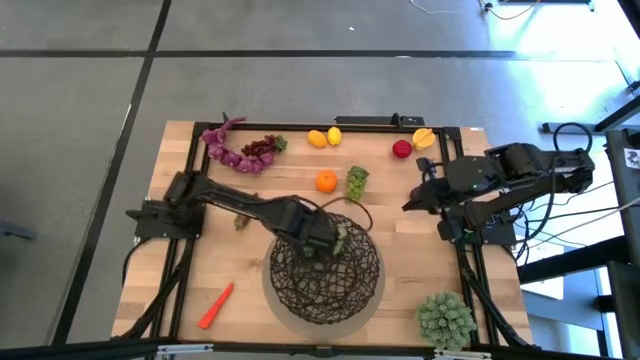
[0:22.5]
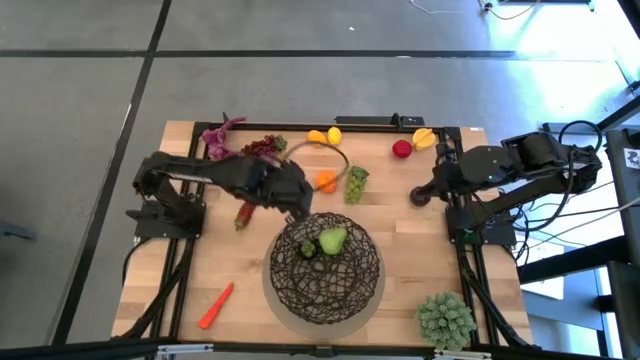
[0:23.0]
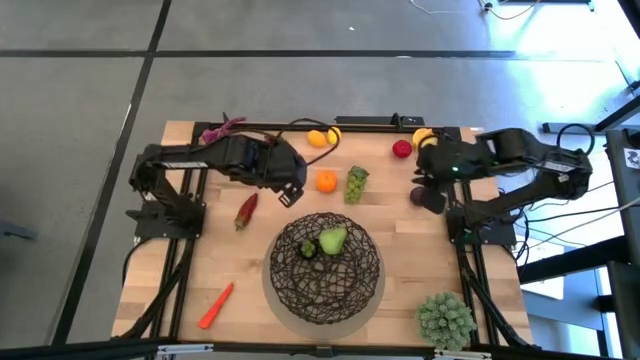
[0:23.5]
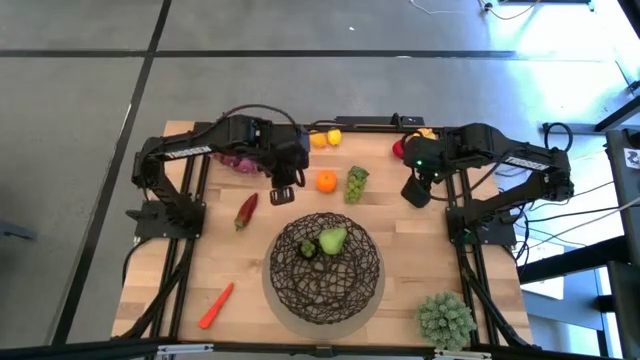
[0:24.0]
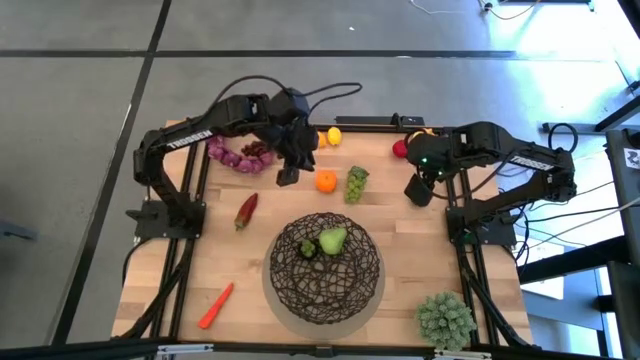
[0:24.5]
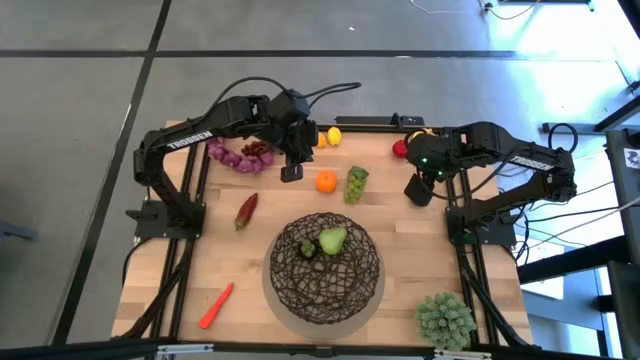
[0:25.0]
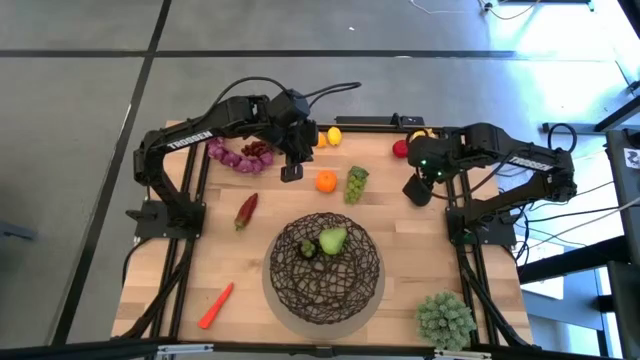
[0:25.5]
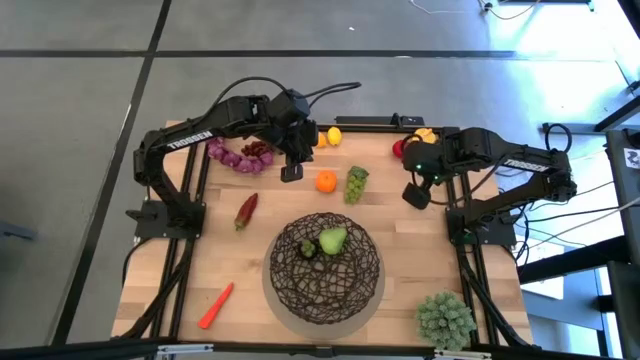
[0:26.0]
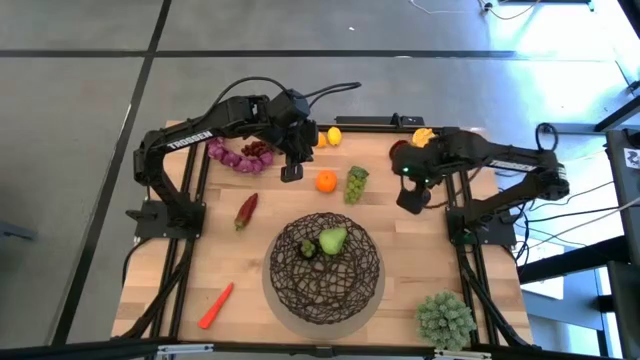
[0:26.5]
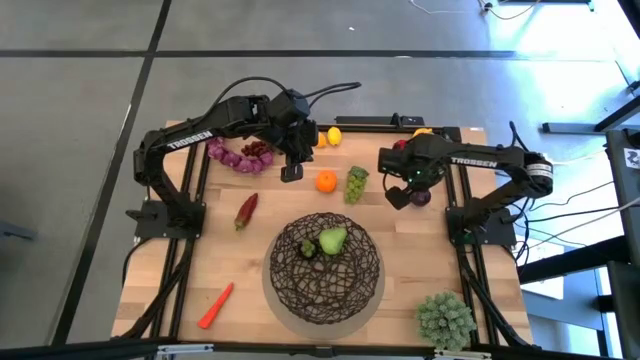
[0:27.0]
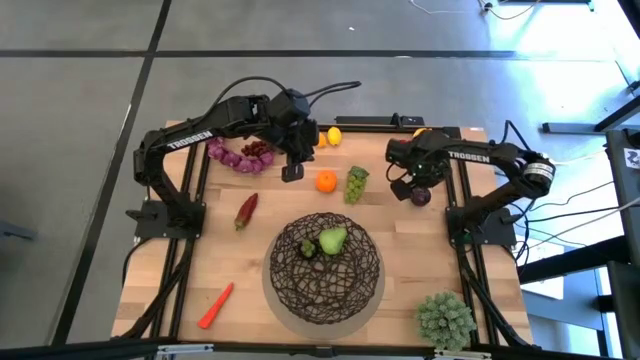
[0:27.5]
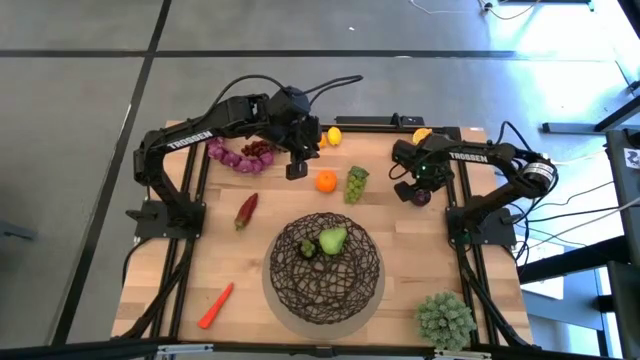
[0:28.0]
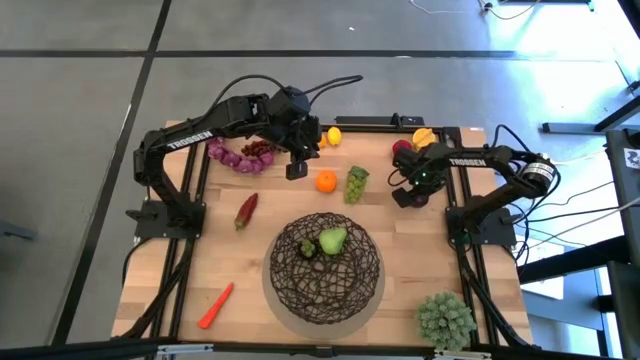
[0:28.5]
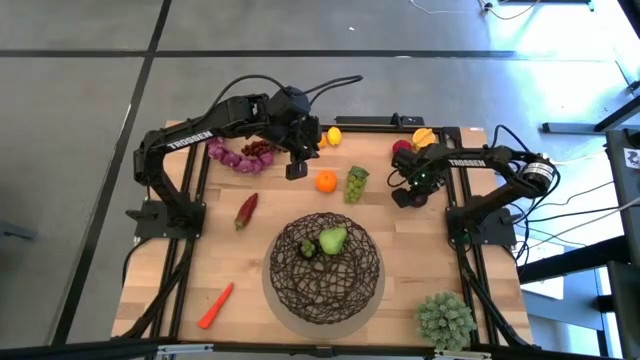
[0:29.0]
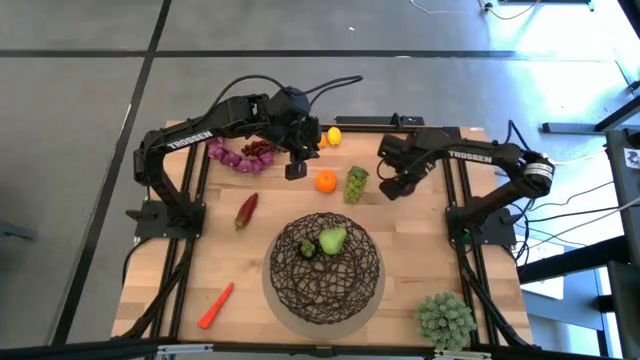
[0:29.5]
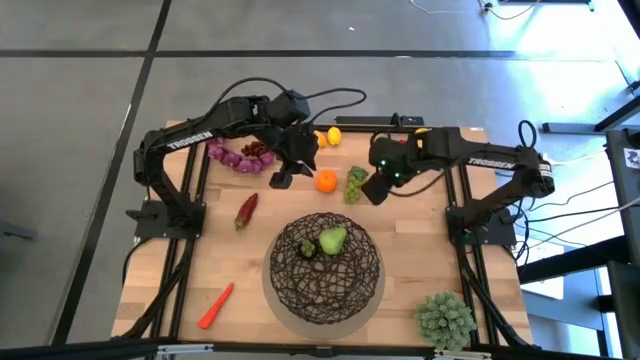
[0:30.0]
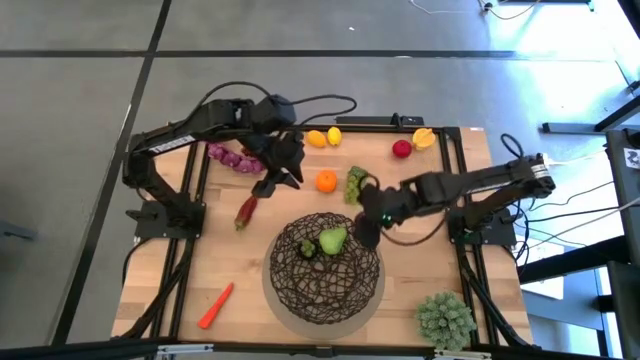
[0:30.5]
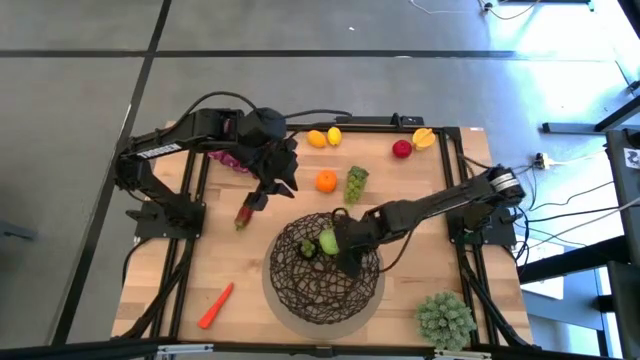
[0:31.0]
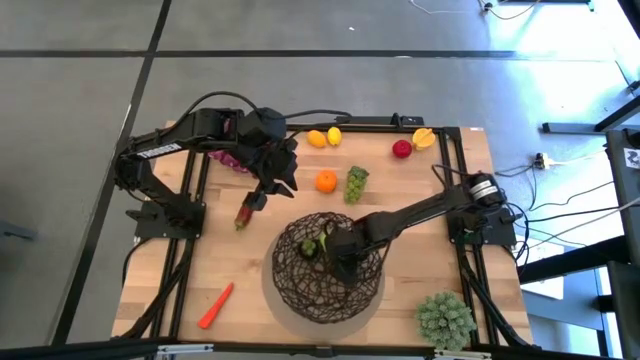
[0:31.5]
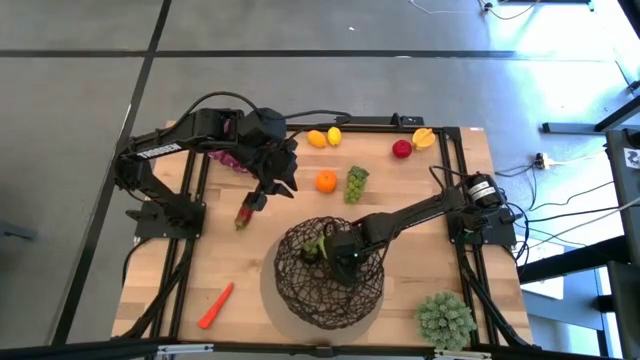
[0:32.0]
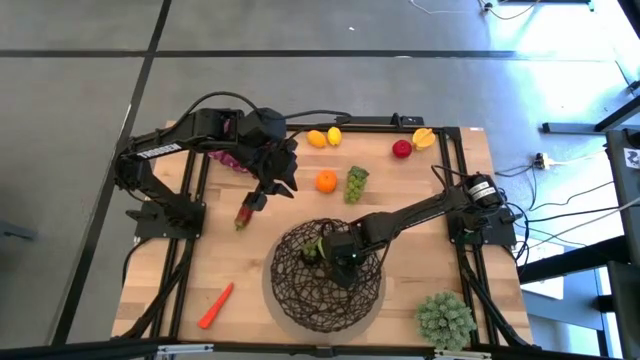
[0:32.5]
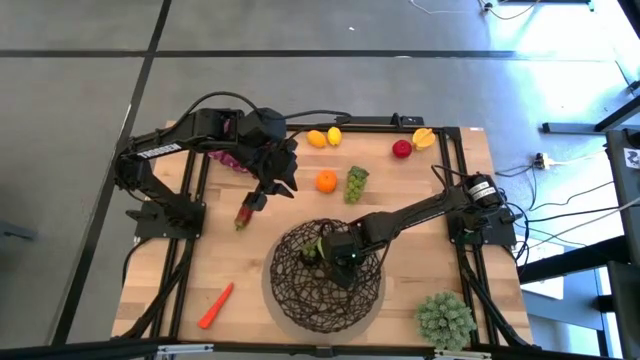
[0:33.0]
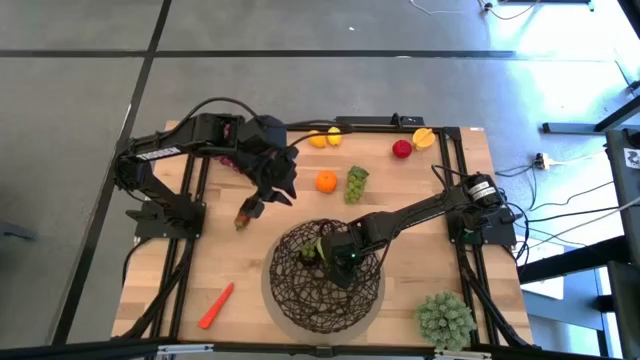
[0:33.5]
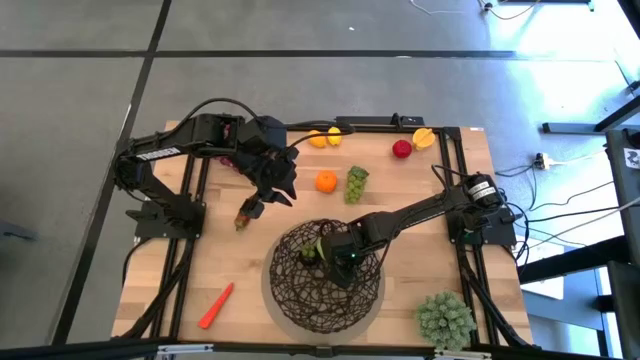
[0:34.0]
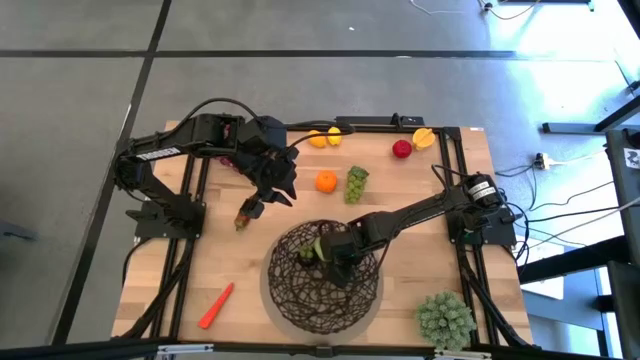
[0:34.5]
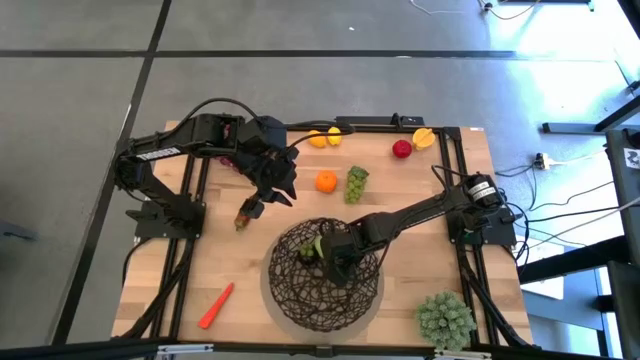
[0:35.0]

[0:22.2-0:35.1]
Task: Build produce basket
Put the plum into the mesh basket

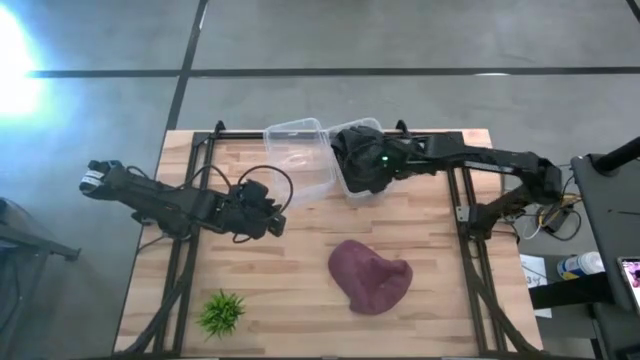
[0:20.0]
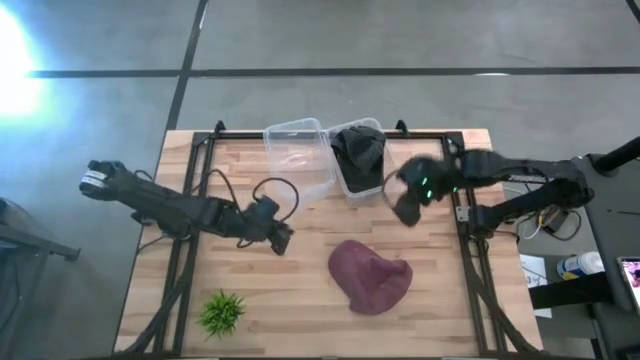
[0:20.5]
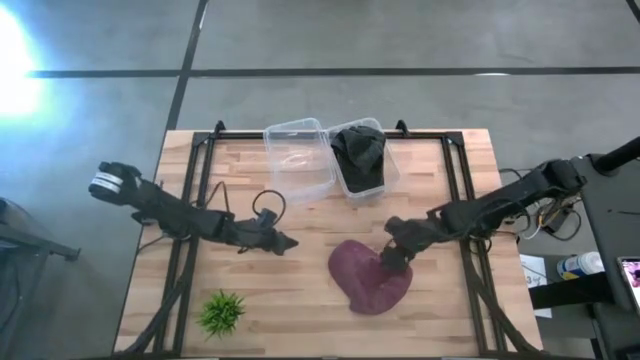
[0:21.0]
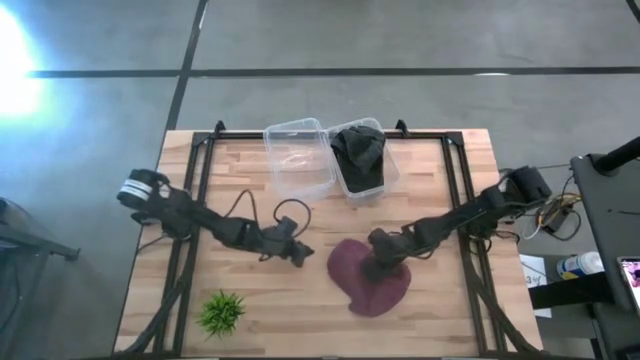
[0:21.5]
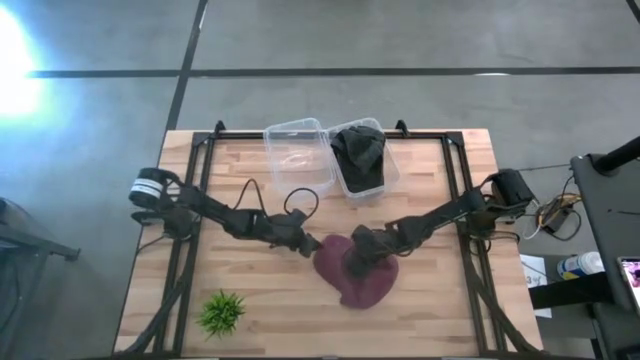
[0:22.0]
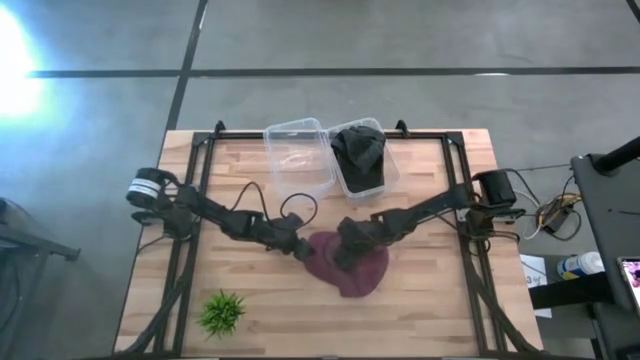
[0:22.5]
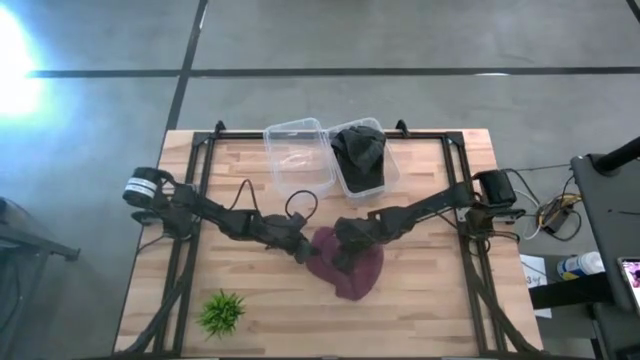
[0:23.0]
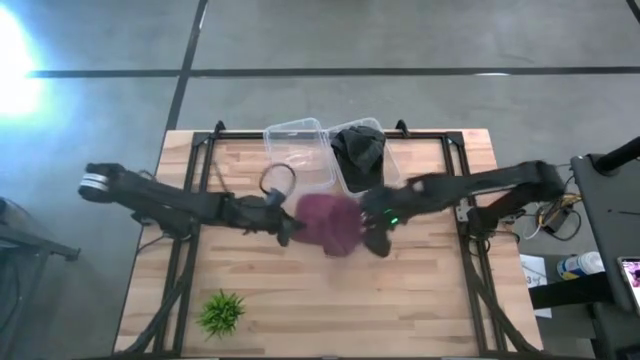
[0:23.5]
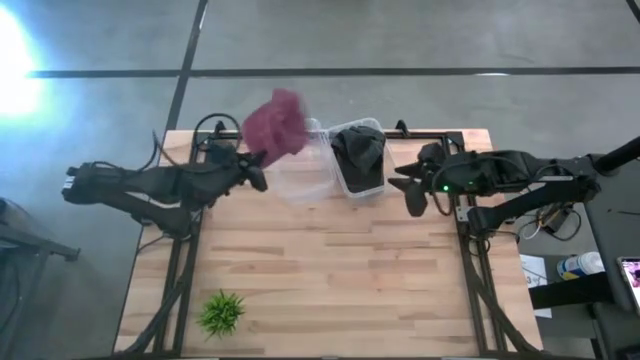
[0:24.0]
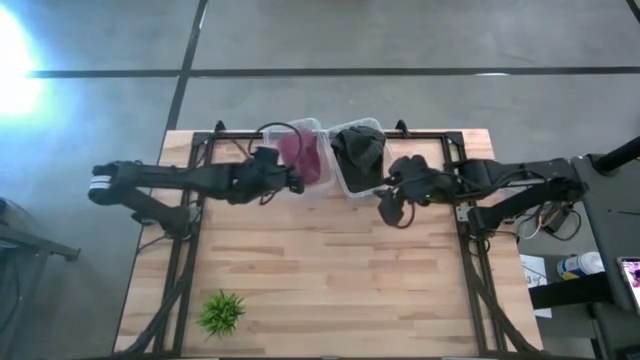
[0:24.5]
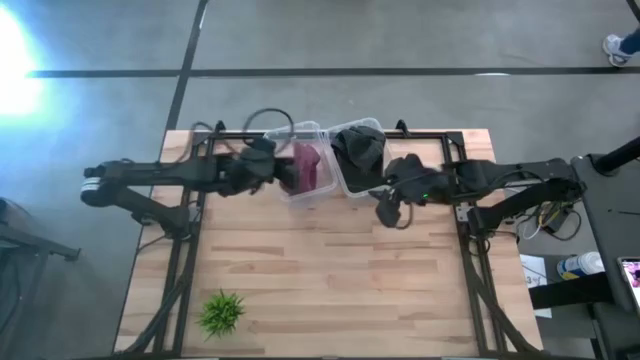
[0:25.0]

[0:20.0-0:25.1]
Task: Pick and place caps into container
Put the red cap into the left transparent container
